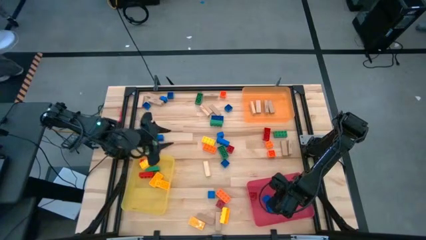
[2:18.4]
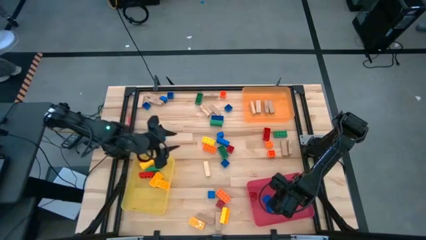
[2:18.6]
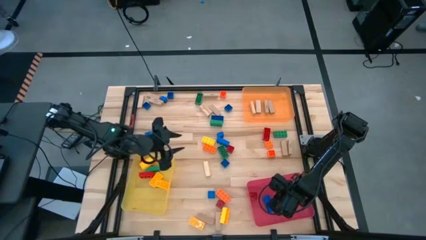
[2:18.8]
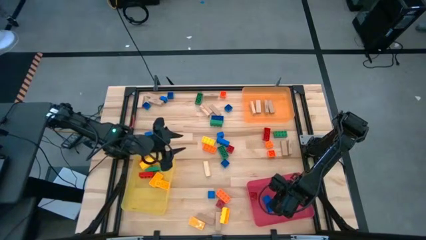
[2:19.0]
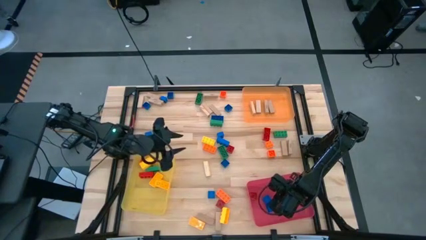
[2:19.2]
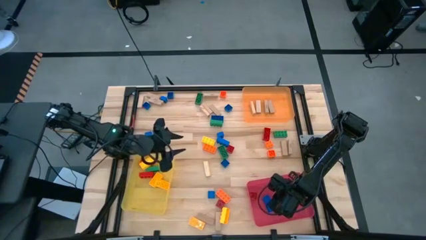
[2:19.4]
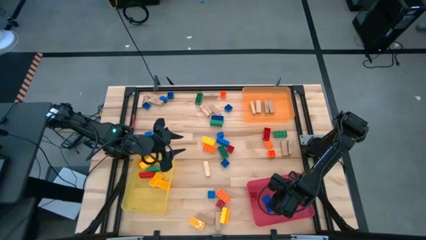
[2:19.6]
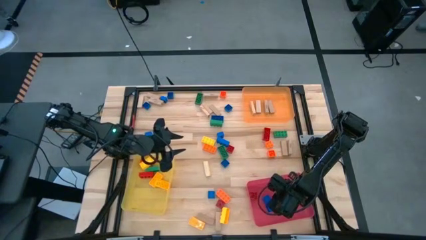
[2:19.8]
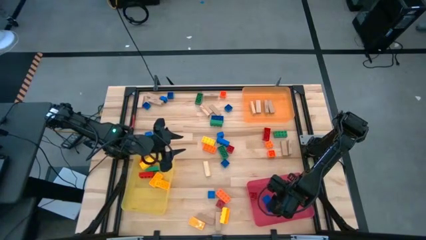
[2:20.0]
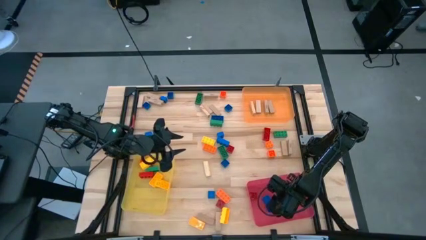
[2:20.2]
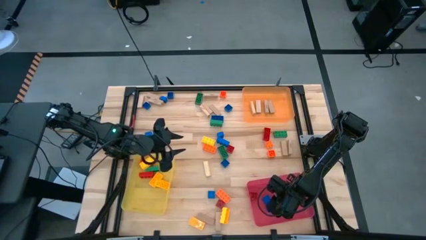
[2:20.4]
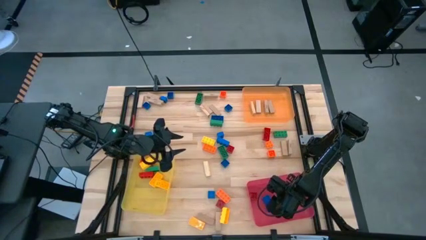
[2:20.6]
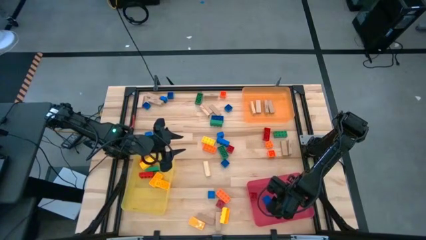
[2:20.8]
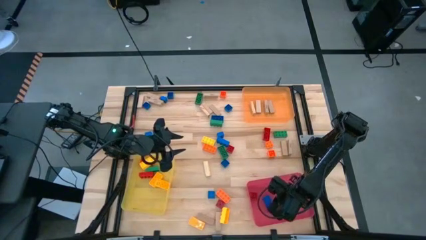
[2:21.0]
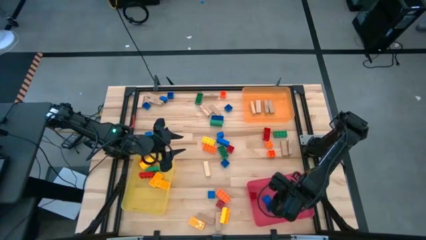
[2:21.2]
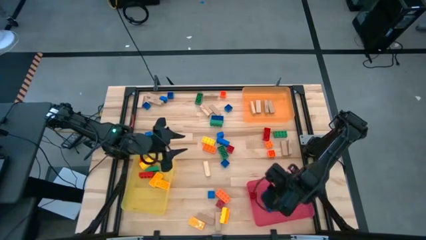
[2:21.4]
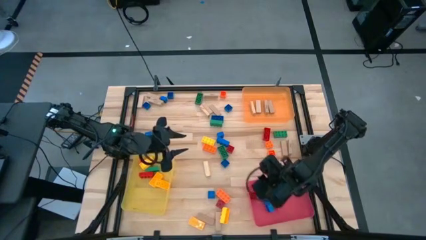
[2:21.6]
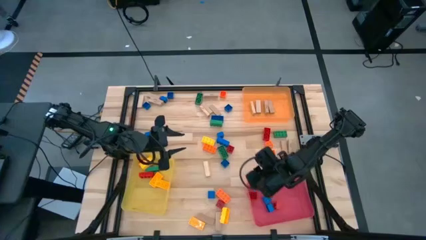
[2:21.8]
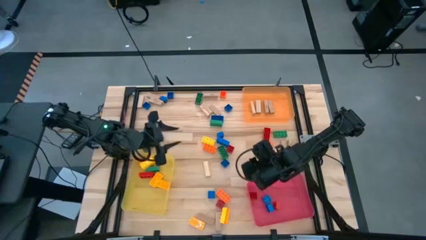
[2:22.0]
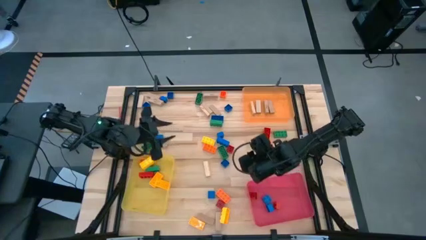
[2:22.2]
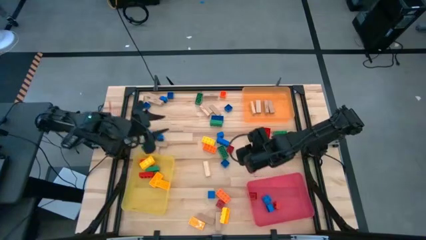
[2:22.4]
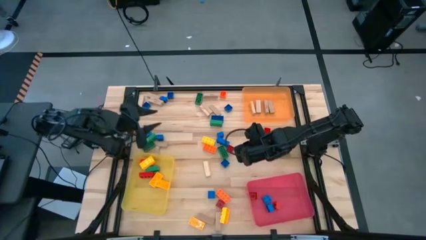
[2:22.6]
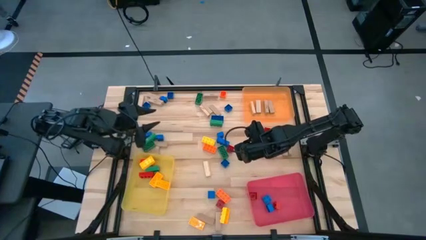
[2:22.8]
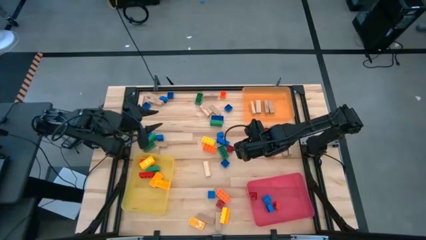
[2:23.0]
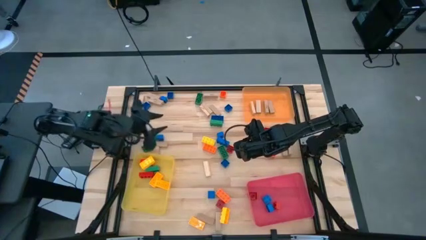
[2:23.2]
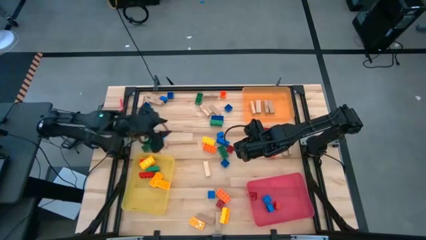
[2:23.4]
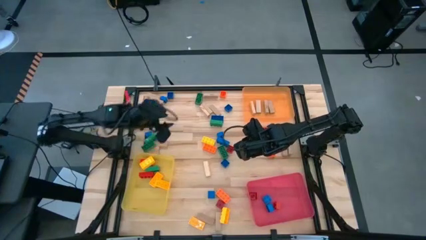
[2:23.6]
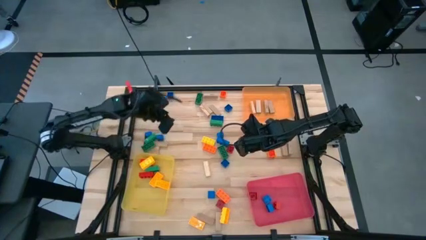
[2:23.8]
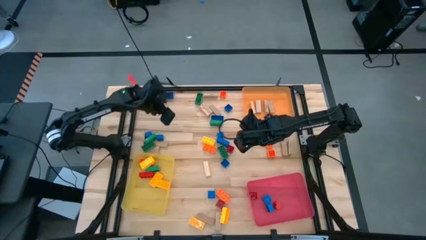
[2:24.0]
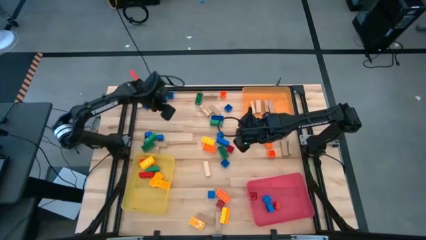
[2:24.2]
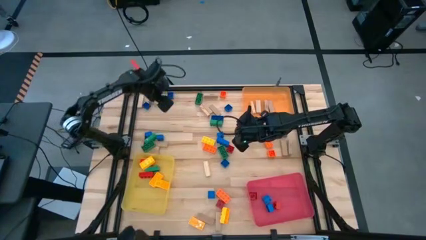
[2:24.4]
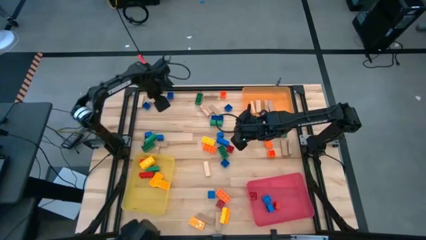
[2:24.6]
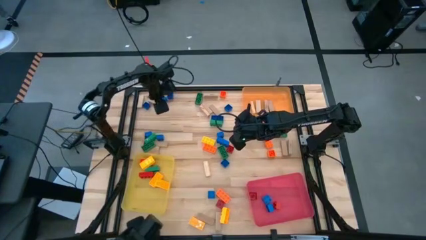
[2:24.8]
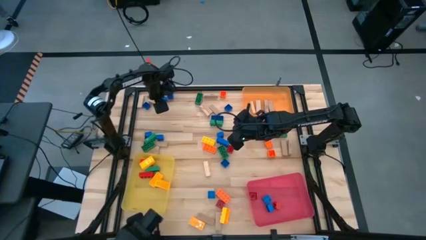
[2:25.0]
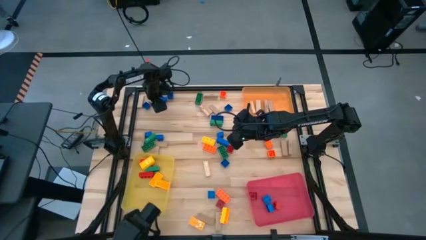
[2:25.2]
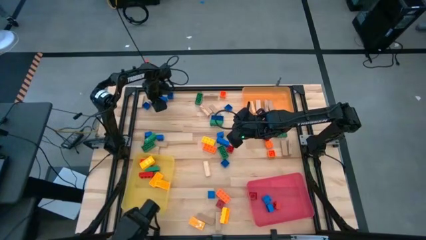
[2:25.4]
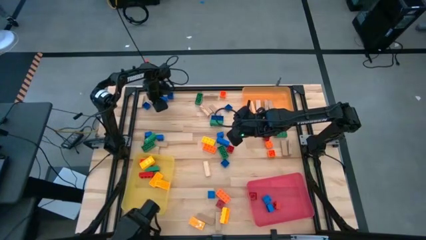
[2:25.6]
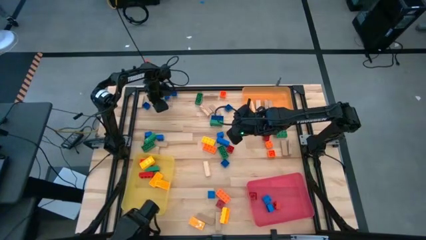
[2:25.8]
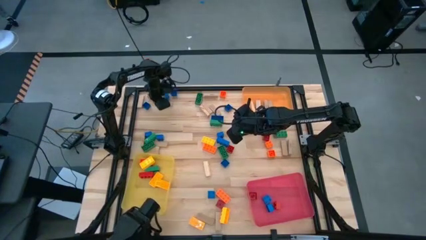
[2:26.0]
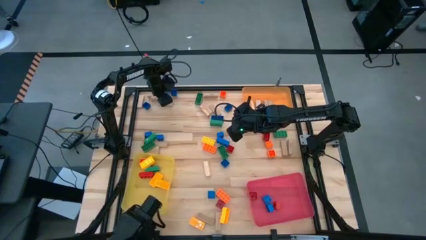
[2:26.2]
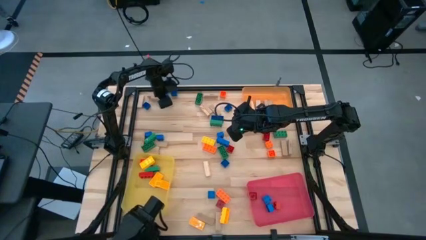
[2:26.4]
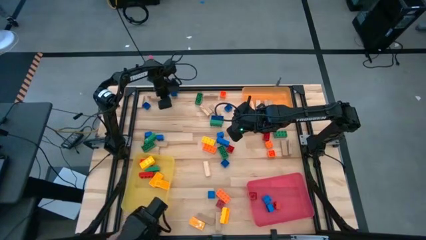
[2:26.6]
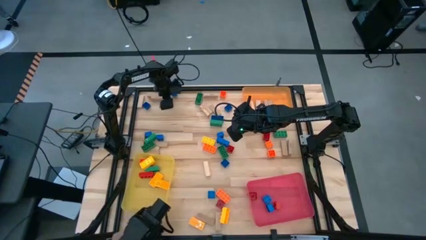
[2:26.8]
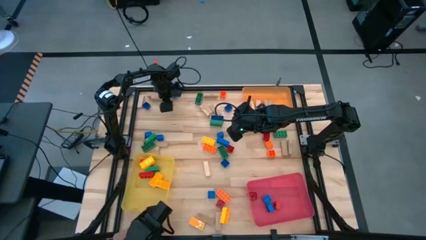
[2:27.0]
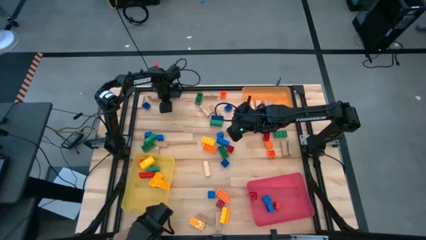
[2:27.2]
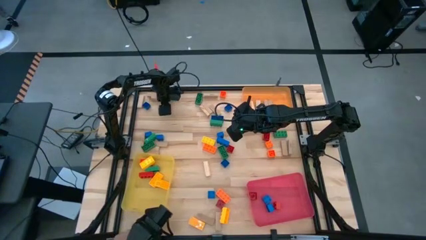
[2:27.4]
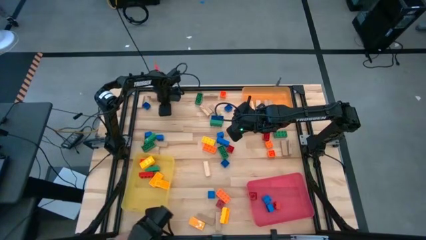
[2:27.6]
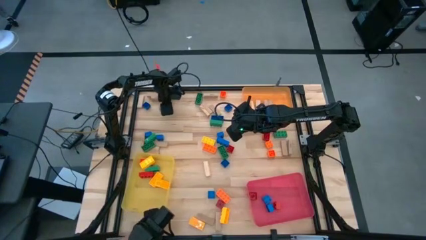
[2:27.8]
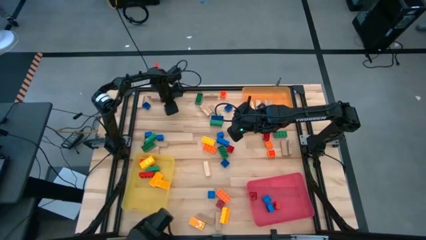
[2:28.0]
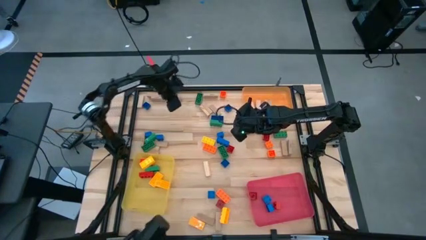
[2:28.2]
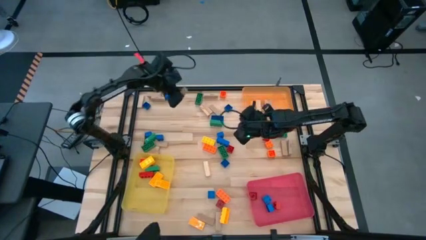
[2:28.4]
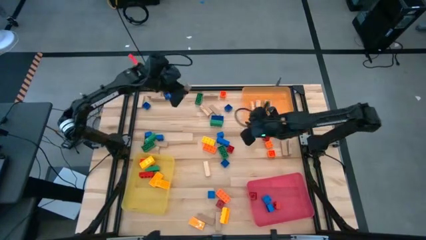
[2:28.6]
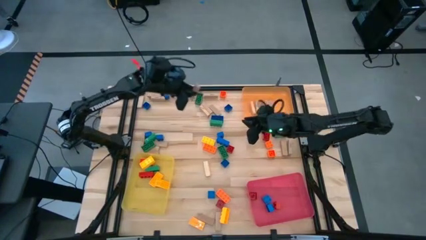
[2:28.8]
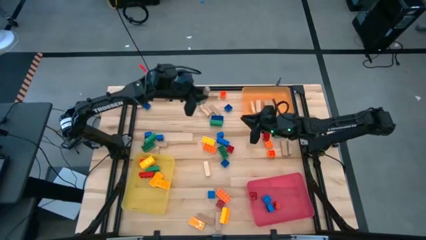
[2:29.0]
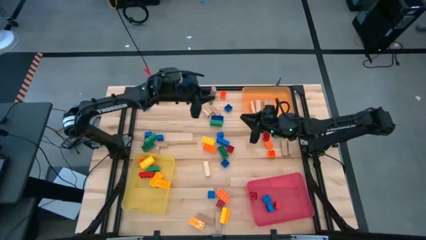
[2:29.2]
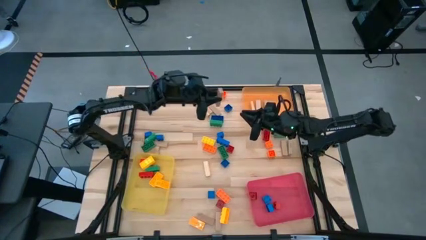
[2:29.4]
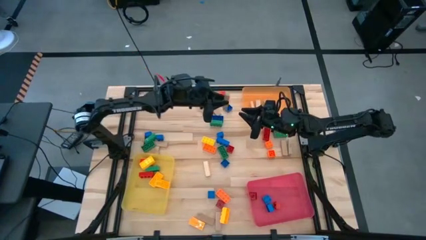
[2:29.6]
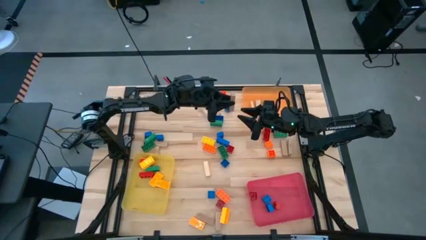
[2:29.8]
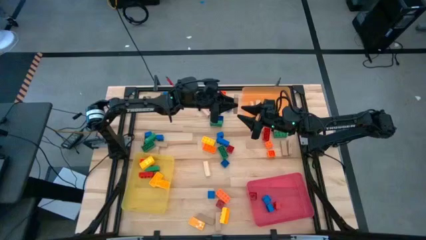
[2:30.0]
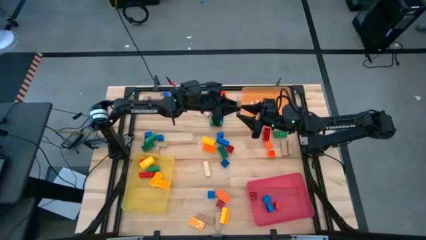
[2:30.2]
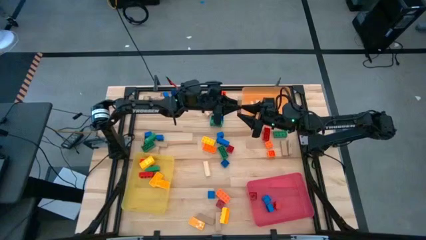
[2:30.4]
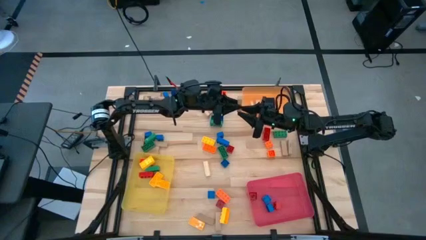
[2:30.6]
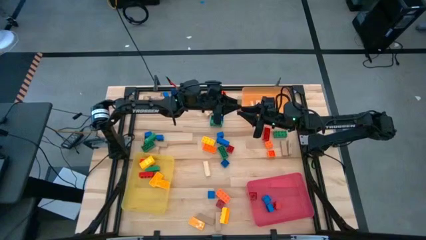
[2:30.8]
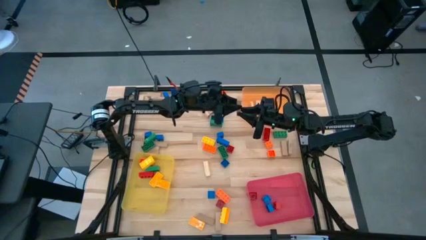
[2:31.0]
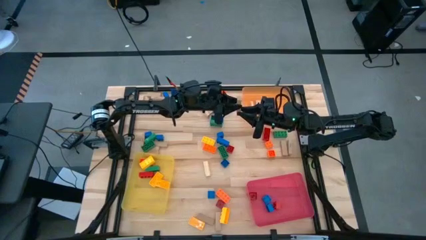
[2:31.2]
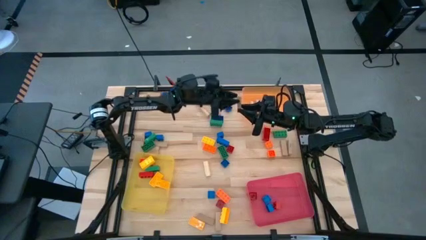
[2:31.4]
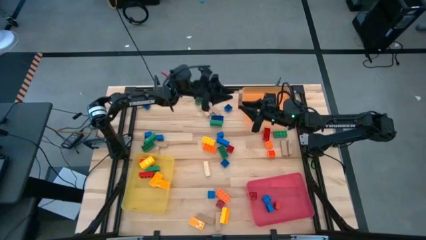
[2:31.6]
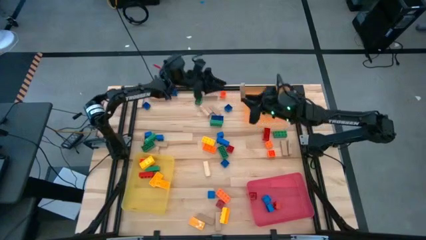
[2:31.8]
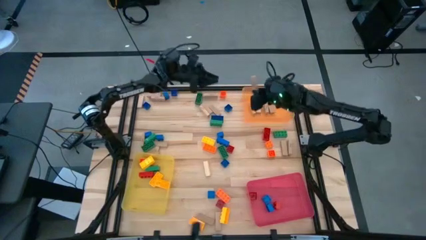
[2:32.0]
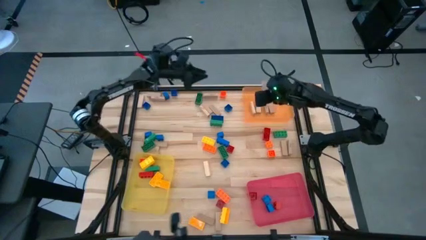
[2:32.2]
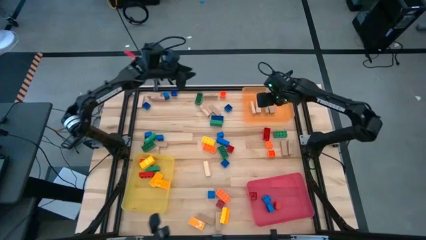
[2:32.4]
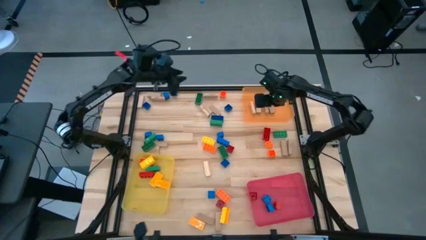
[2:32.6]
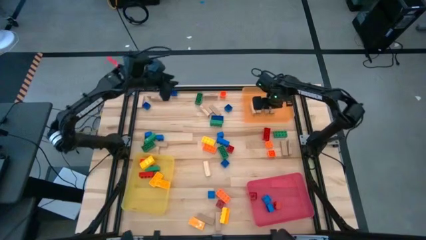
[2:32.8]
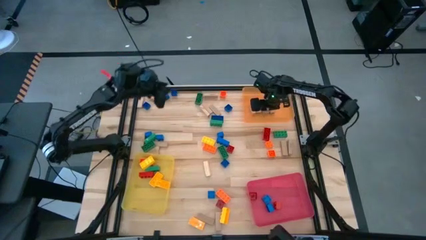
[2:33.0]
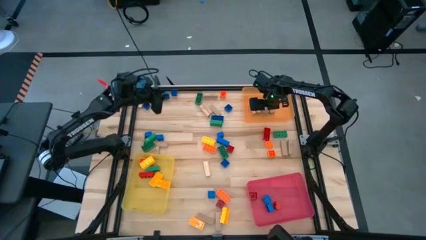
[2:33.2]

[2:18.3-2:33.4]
Task: Sort blocks by size
Put the brown block into the orange bin
